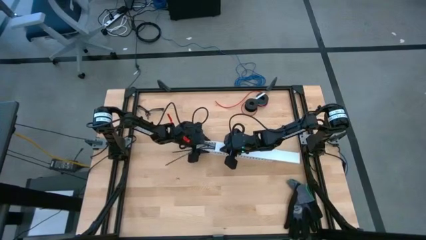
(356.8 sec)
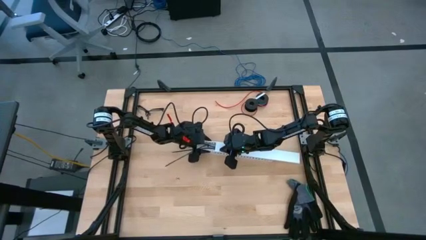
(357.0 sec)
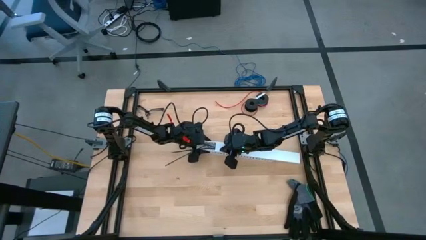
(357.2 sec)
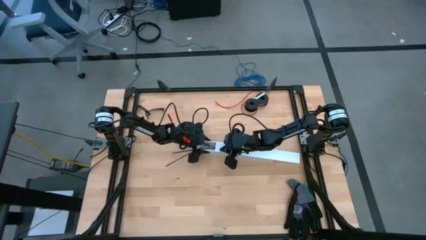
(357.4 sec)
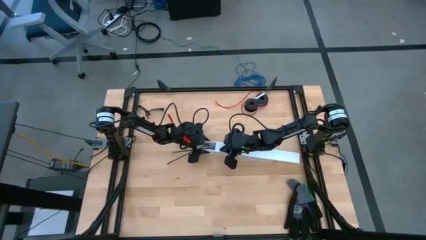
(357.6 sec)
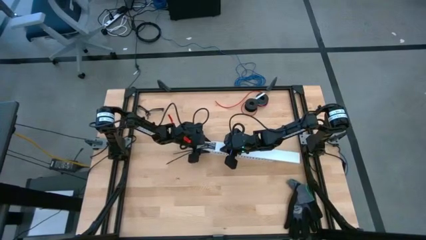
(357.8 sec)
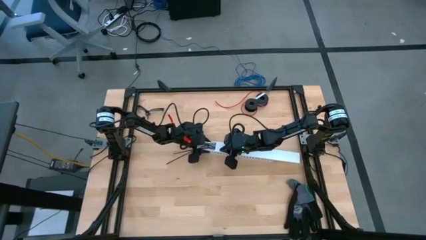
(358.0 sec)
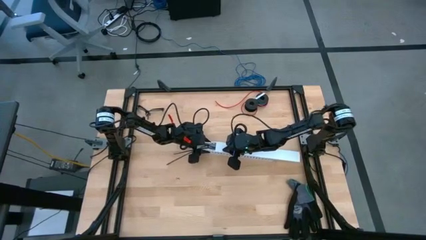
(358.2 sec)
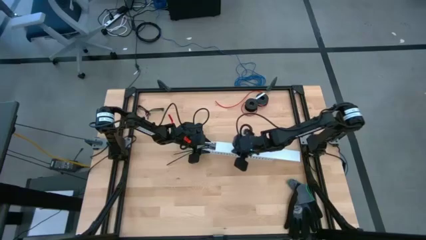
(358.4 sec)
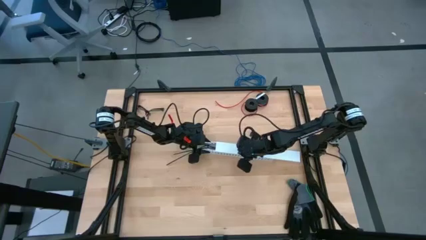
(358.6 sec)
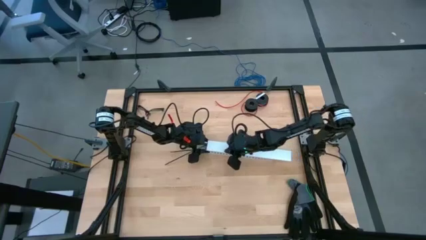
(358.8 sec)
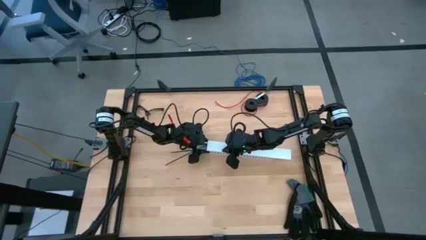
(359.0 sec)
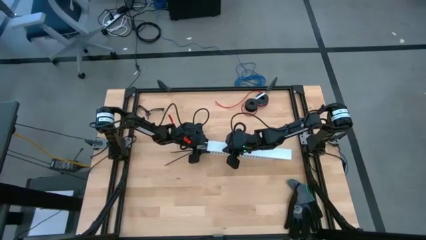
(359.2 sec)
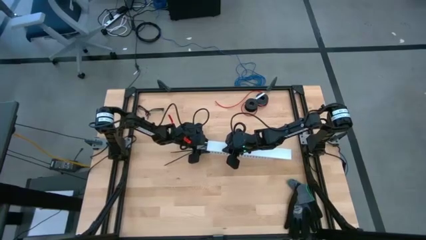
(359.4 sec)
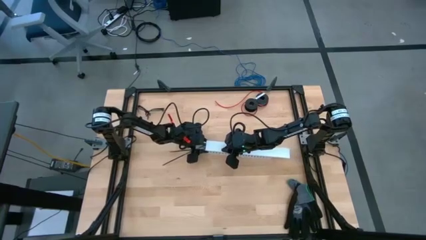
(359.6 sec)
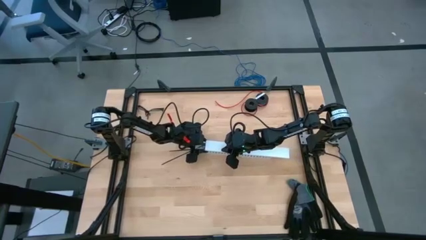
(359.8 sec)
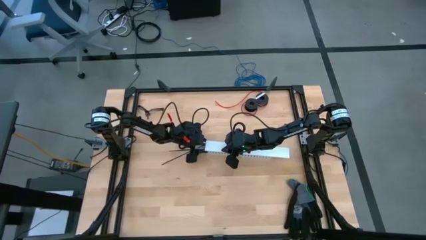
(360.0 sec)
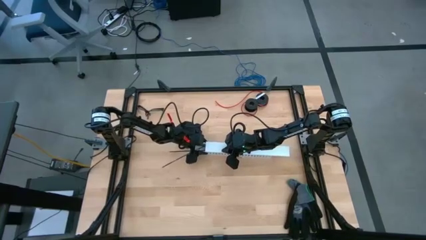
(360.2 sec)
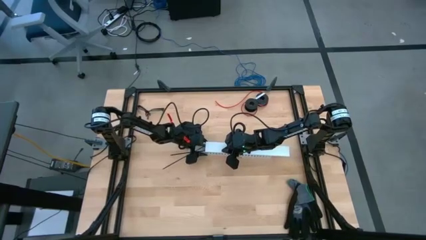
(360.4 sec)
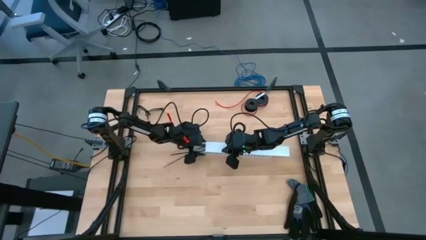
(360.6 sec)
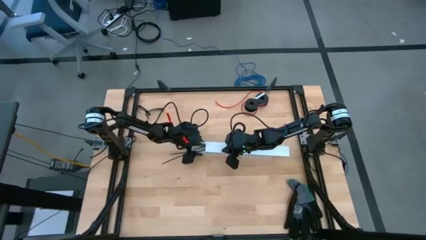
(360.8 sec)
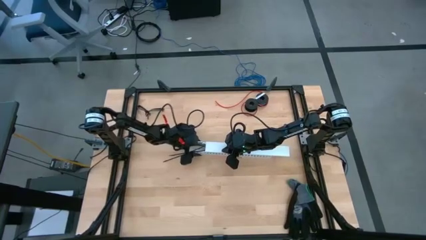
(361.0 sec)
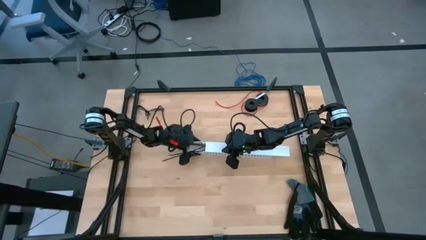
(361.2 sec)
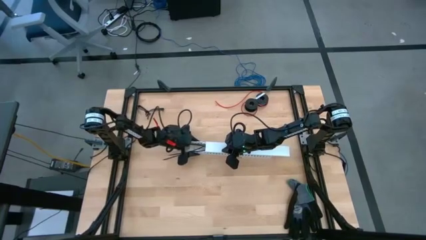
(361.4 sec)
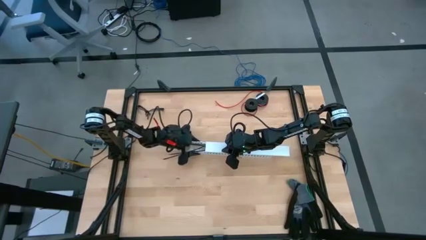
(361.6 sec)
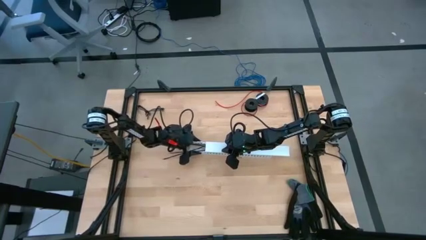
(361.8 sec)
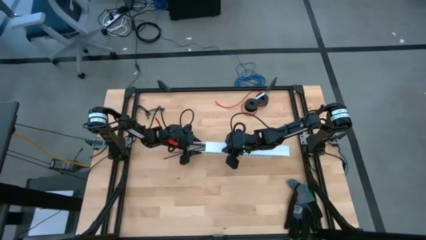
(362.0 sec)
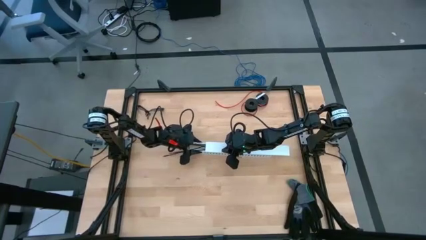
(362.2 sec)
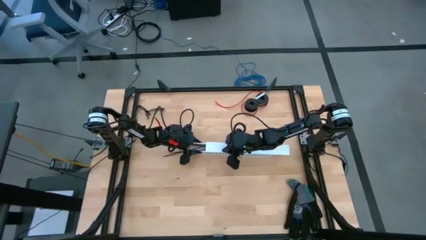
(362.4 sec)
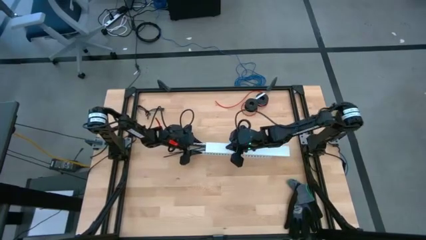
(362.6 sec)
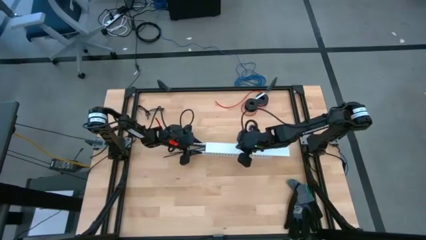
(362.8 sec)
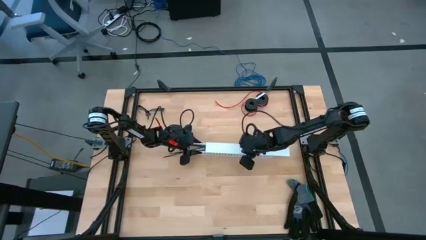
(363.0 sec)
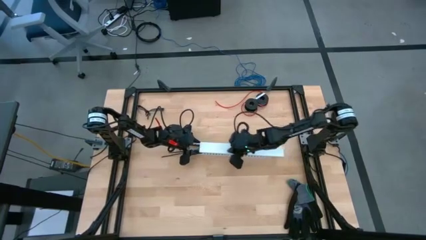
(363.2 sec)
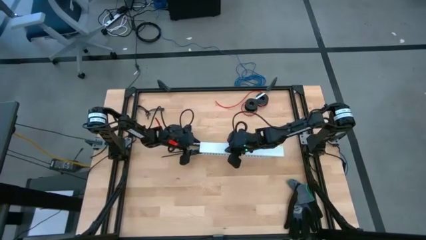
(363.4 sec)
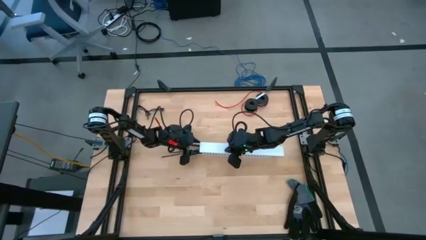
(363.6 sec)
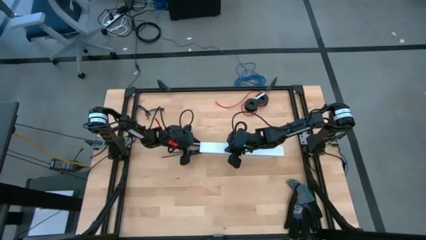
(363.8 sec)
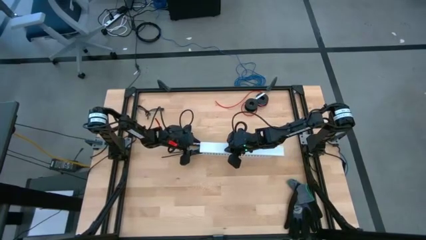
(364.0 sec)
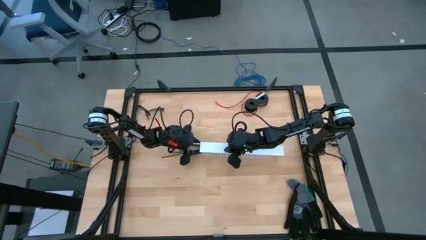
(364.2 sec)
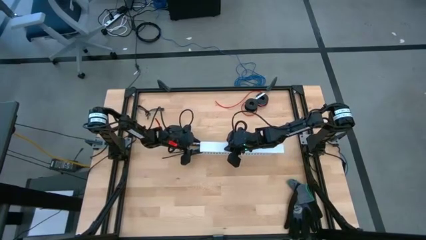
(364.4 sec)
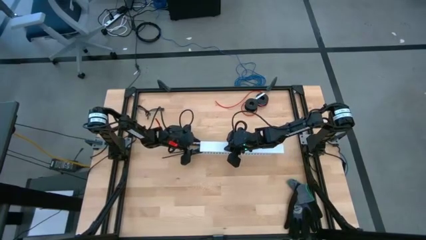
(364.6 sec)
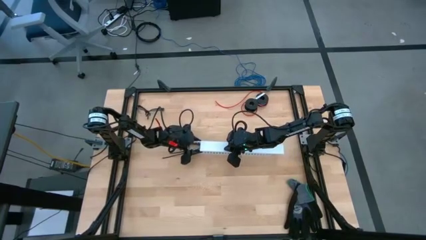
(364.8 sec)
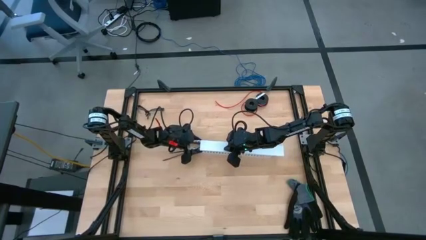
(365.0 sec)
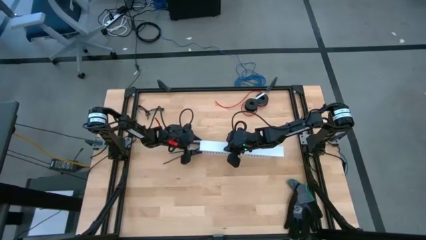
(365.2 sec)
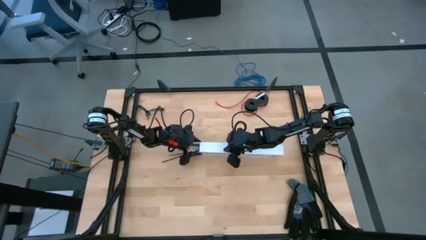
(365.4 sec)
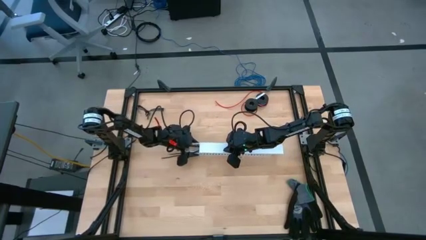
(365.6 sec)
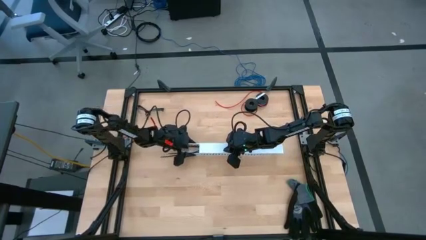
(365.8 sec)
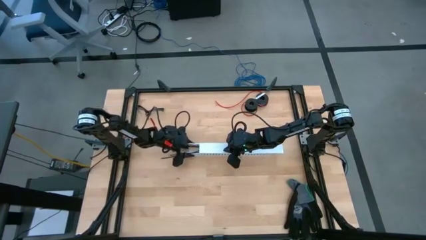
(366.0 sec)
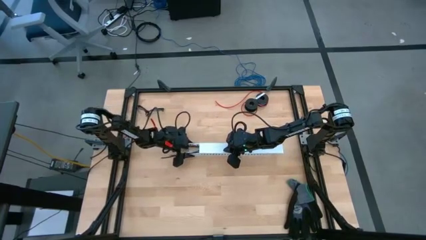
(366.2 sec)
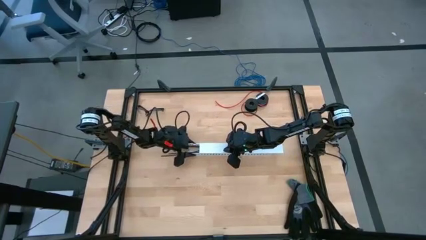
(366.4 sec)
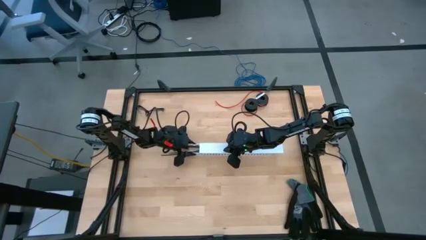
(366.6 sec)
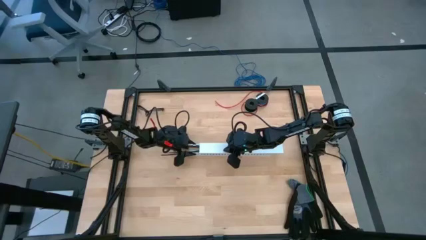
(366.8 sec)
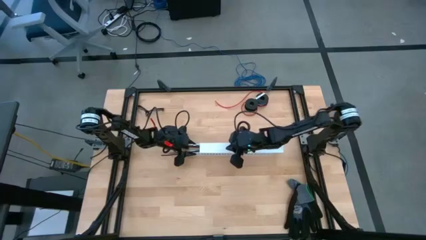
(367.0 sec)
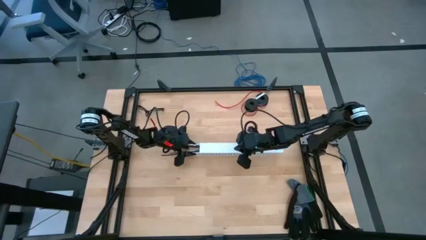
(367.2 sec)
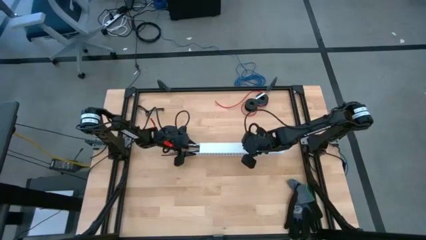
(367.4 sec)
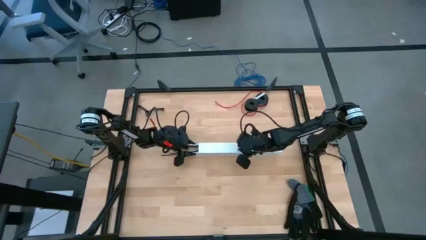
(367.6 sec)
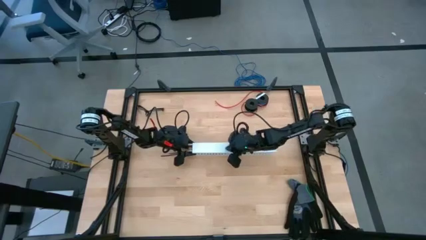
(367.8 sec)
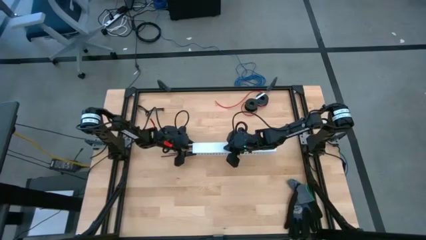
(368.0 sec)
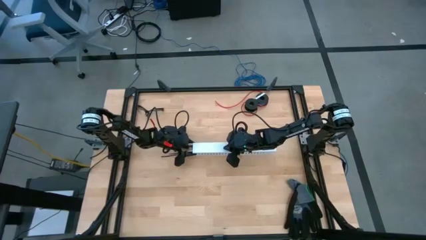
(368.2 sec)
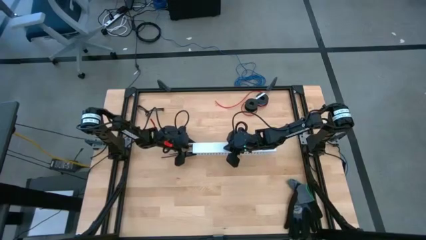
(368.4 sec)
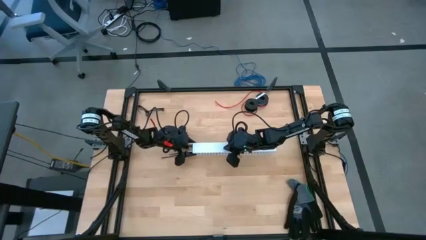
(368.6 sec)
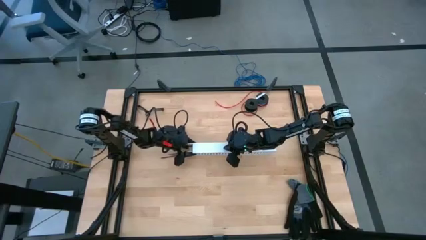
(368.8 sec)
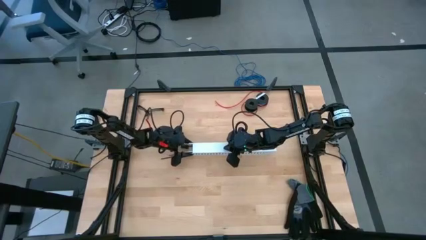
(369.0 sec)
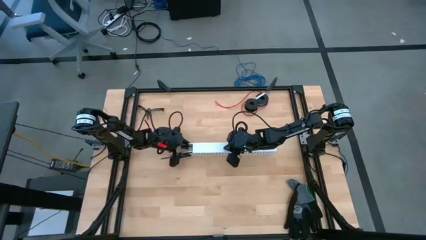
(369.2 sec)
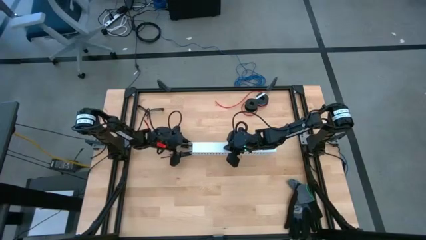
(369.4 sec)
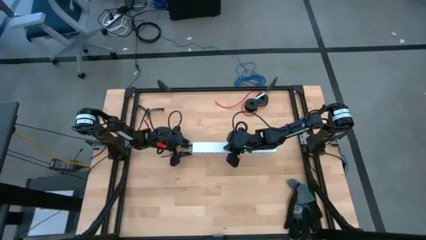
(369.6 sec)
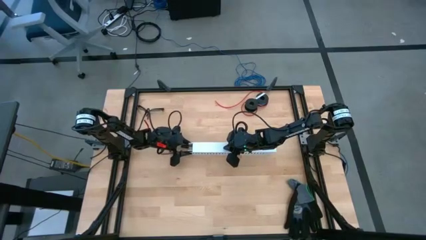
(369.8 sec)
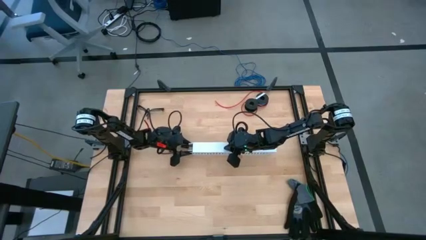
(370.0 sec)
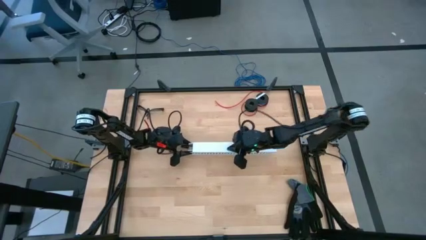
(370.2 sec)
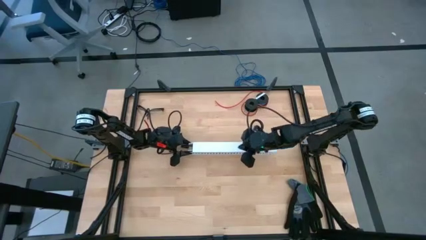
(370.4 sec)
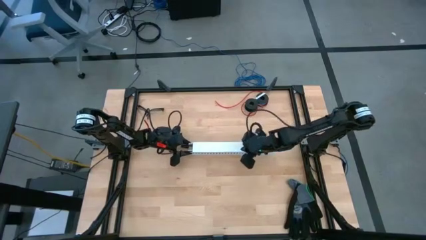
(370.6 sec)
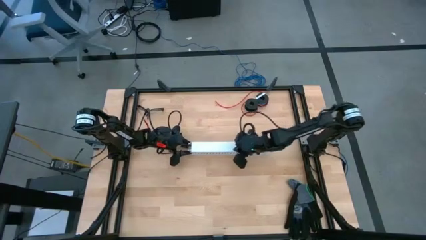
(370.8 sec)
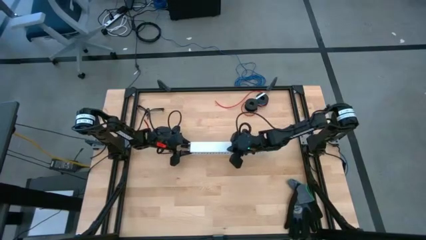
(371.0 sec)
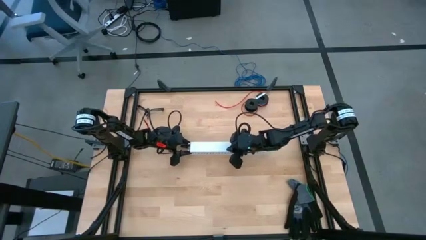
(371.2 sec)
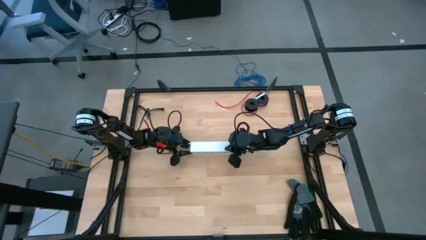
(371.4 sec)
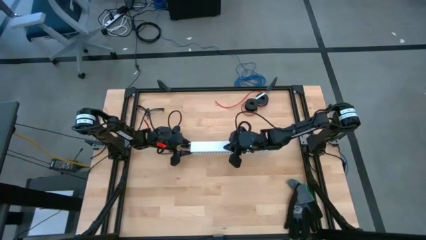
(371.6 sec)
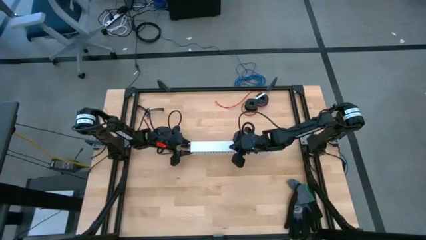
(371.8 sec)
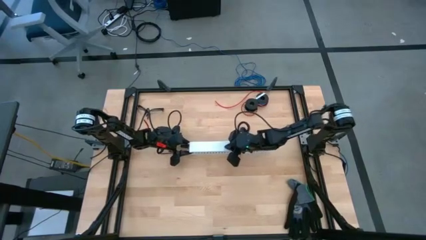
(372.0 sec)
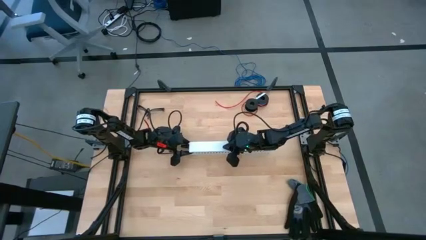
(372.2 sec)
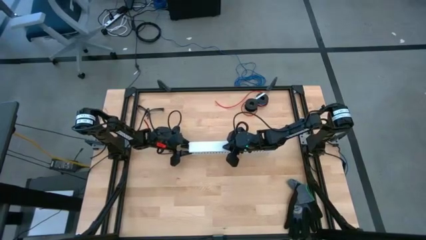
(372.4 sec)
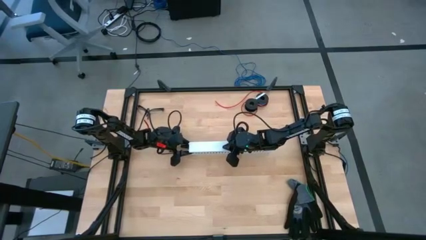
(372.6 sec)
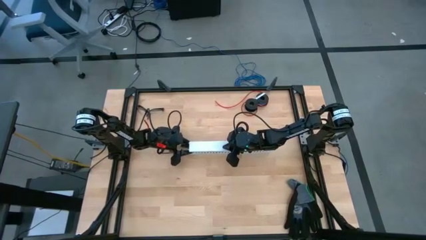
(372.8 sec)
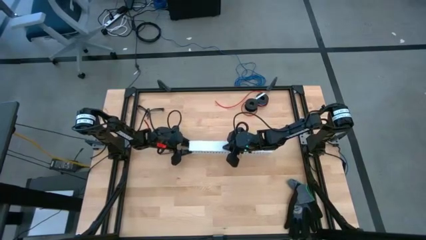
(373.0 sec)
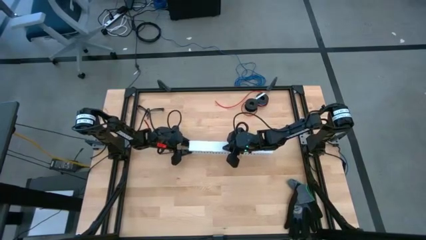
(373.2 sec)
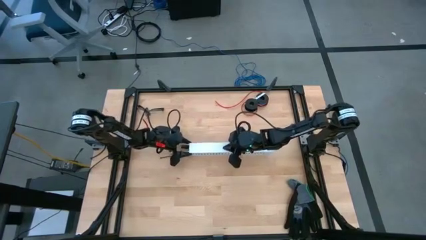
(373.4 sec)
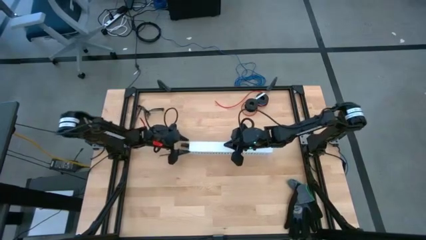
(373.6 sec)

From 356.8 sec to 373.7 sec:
Task: Ziptie cables
Close the white cable duct
